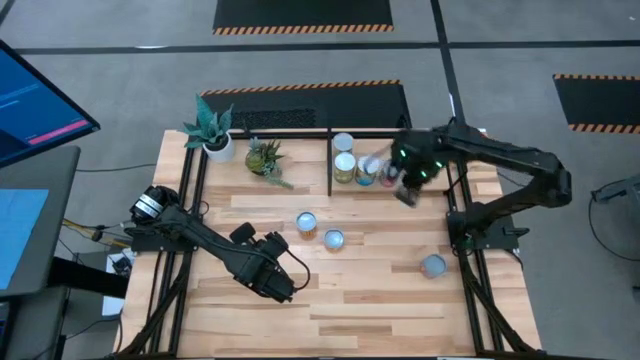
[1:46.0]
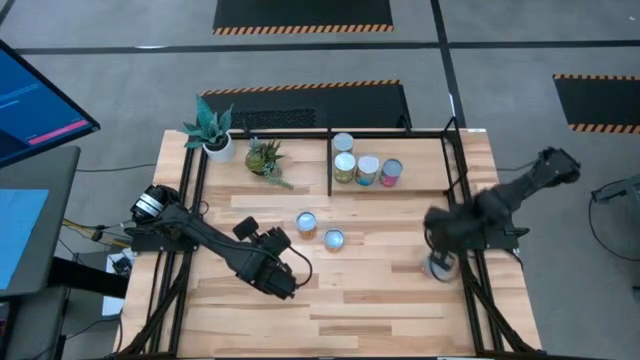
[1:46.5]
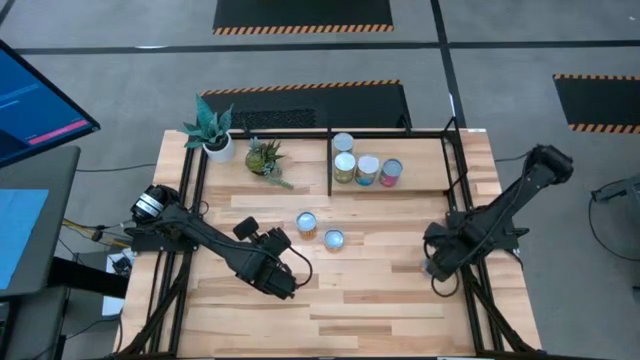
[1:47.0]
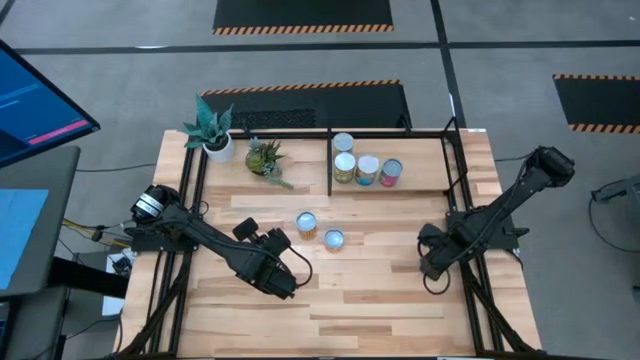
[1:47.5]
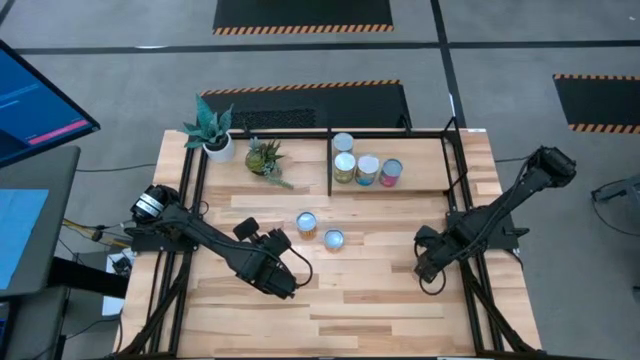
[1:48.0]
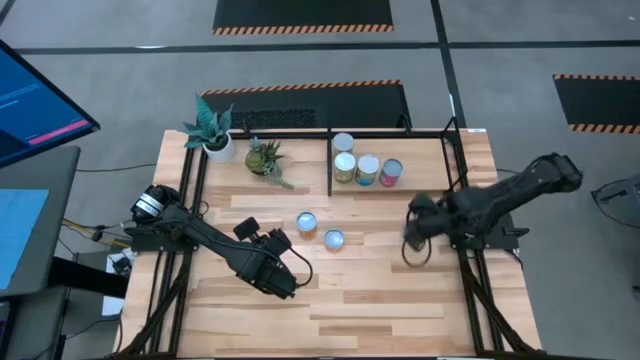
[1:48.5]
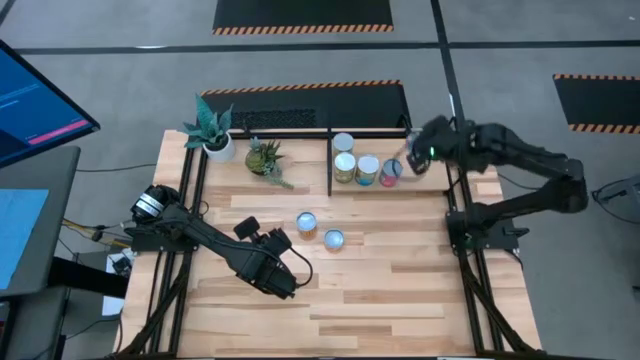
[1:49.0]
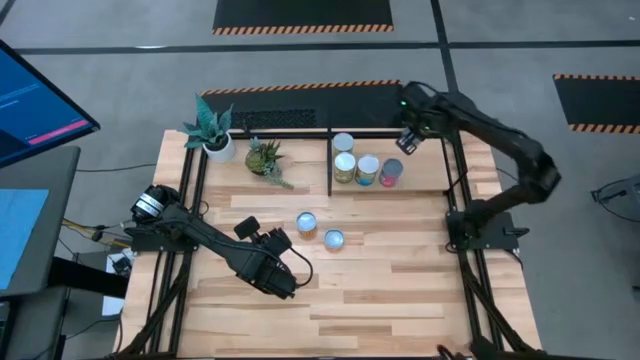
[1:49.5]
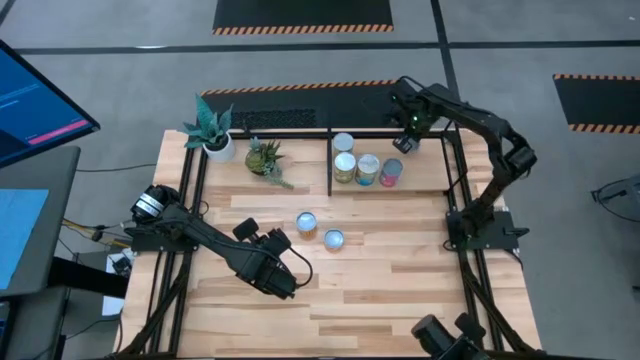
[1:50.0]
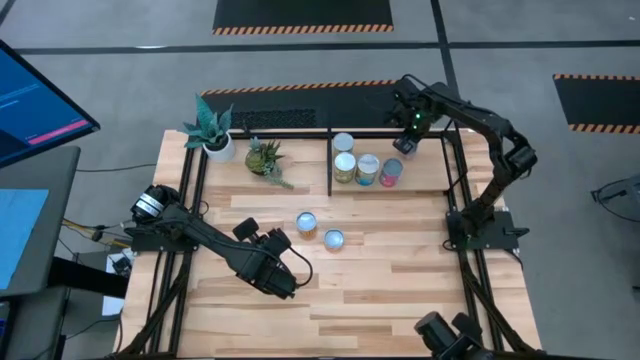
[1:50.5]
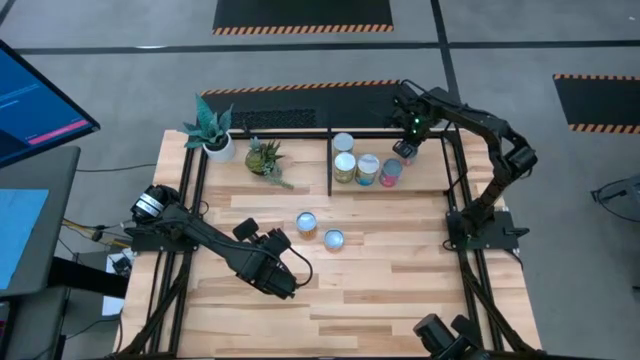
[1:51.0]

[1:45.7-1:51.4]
Task: Pick and place cans onto a shelf
Put the canned corn on the shelf

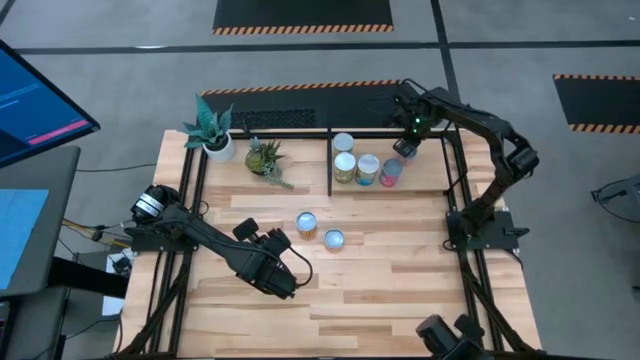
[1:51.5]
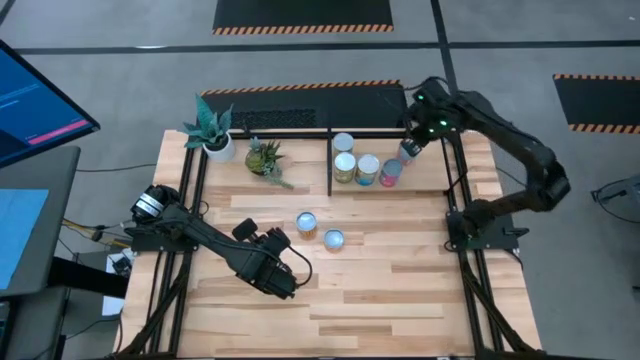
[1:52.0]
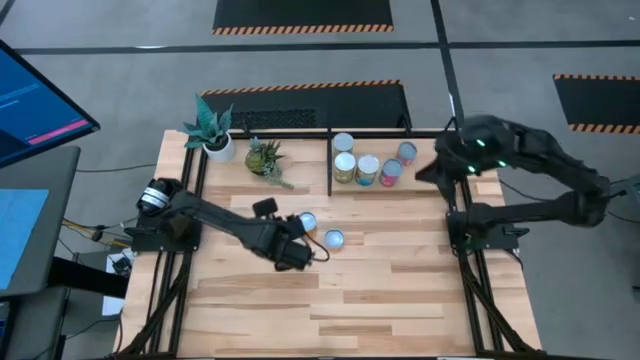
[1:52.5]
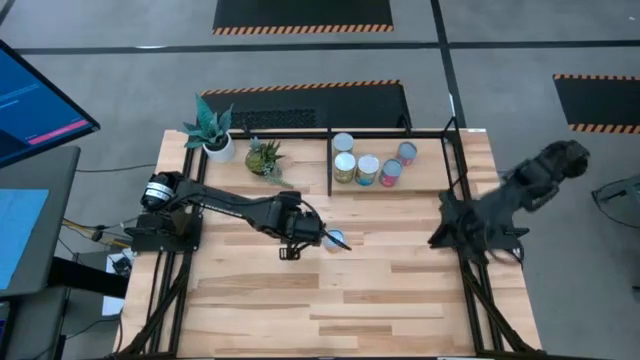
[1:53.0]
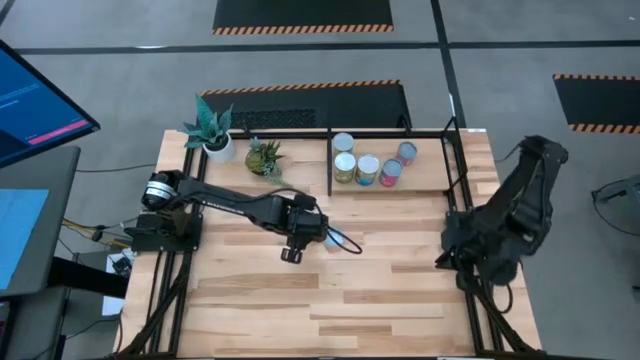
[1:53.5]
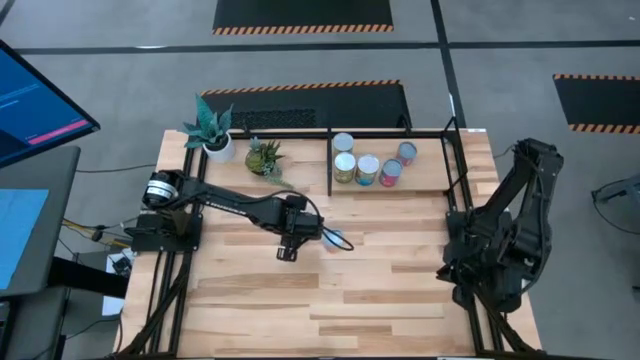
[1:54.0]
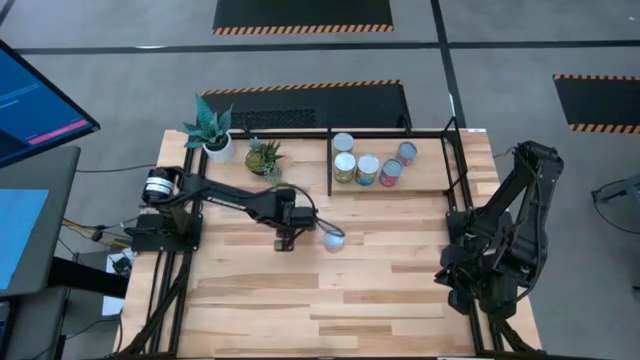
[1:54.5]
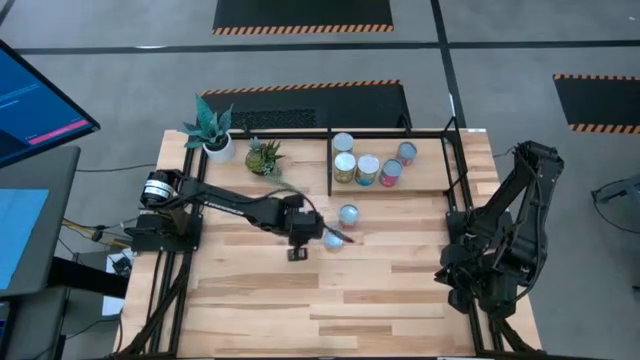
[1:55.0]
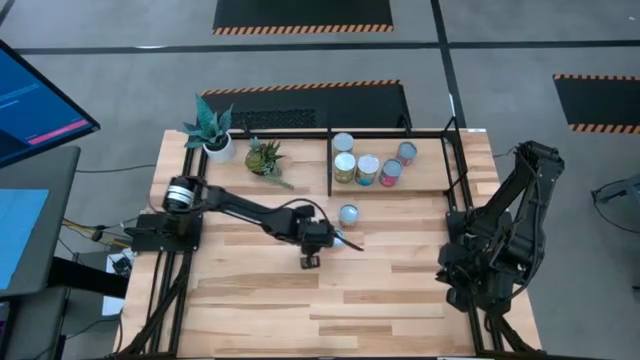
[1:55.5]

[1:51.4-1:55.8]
Prepare the canned goods to the center of the table

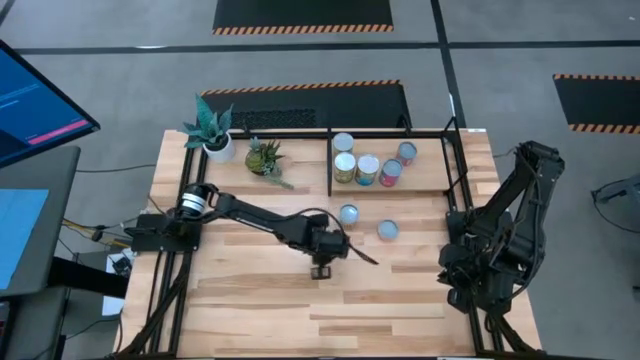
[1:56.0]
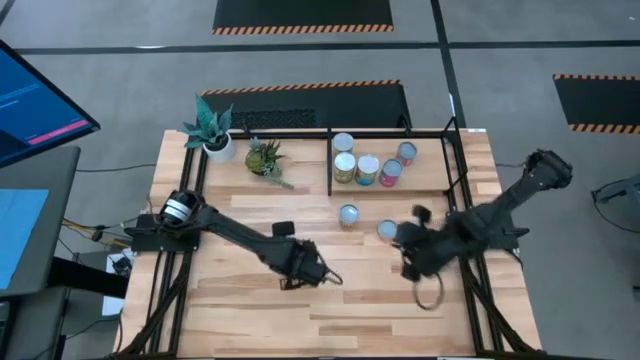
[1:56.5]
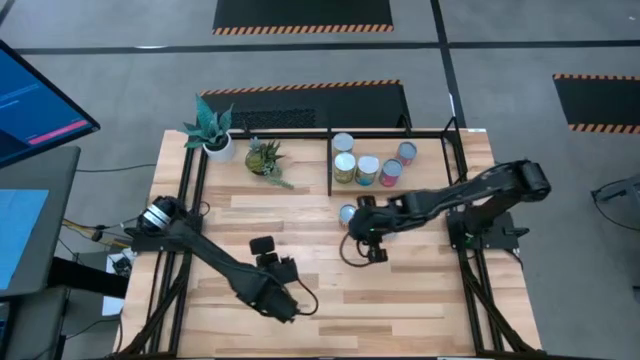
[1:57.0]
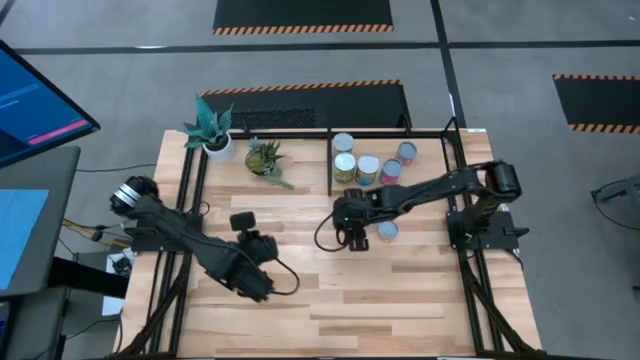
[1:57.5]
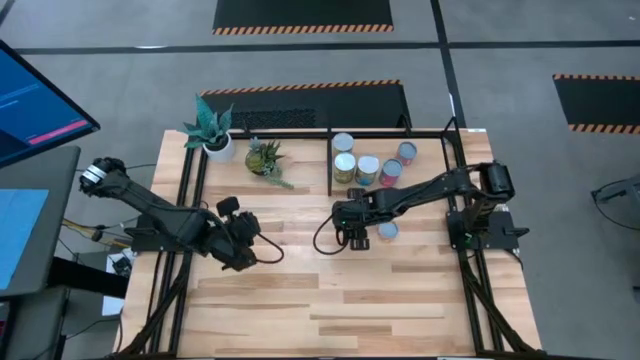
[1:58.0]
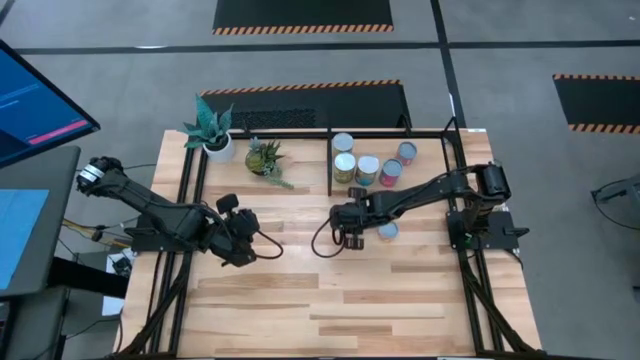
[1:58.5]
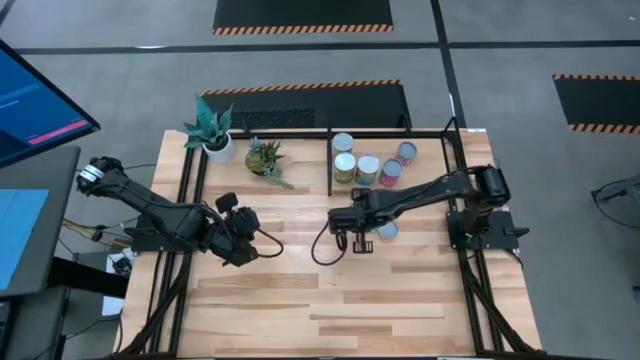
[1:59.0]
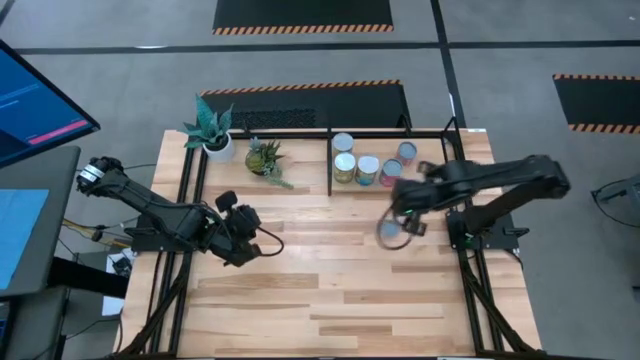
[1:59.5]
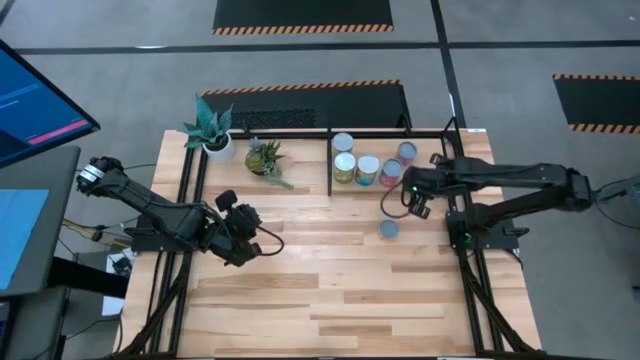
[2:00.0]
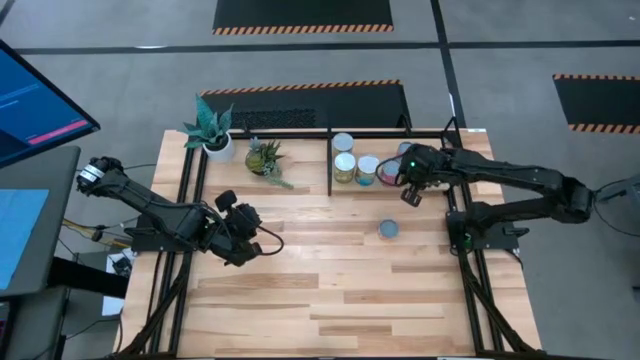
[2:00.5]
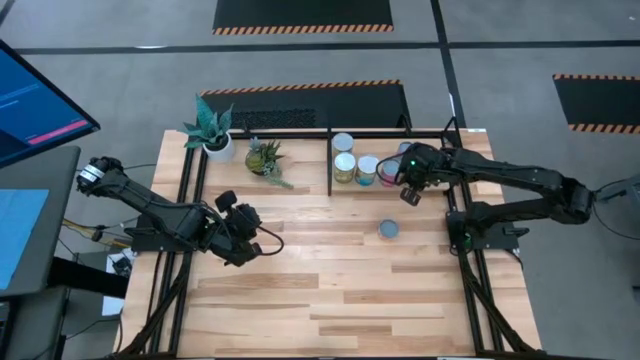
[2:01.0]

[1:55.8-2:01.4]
Put the canned black beans on the shelf

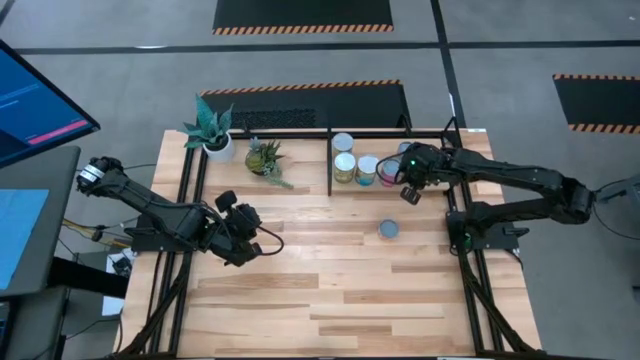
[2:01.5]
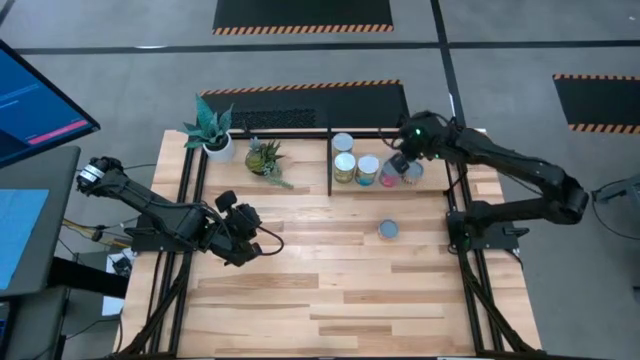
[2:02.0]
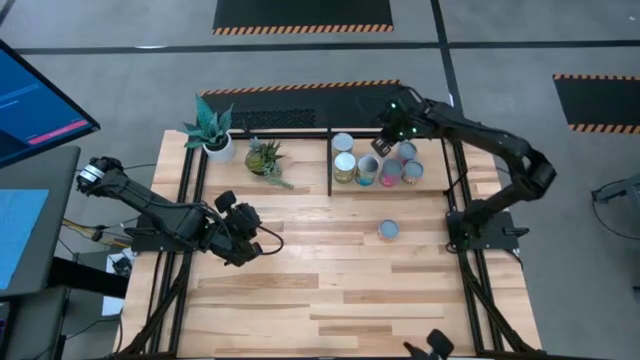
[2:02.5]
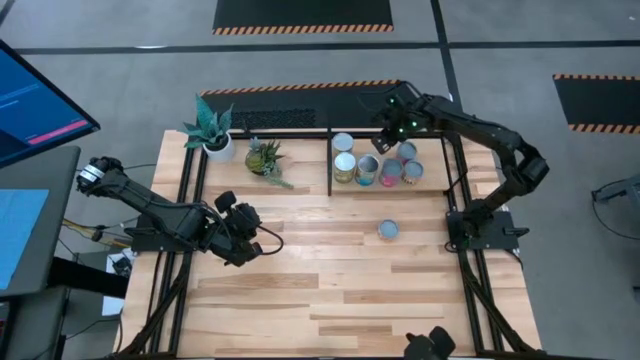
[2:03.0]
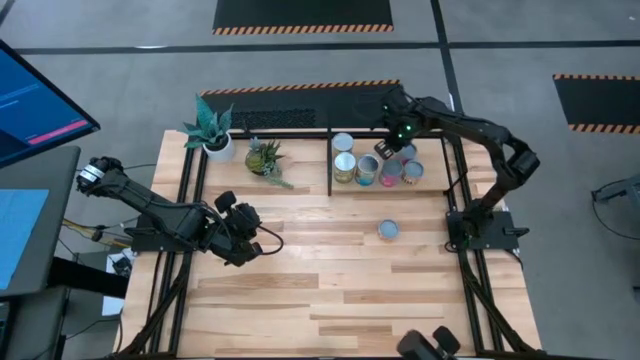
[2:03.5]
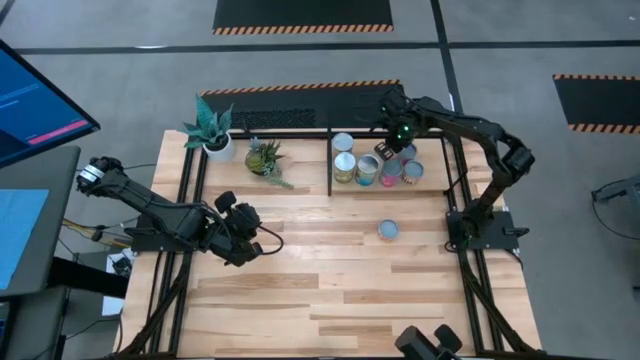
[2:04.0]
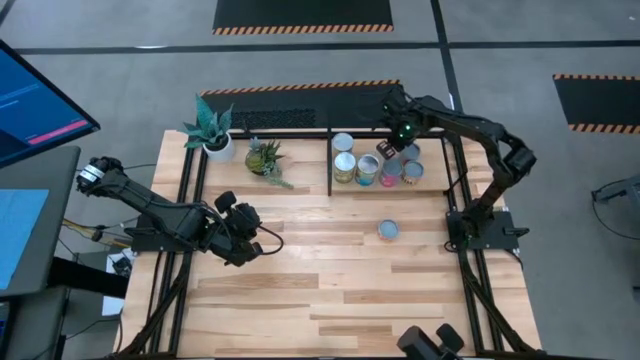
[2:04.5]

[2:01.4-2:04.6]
Adjust the canned corn on the shelf

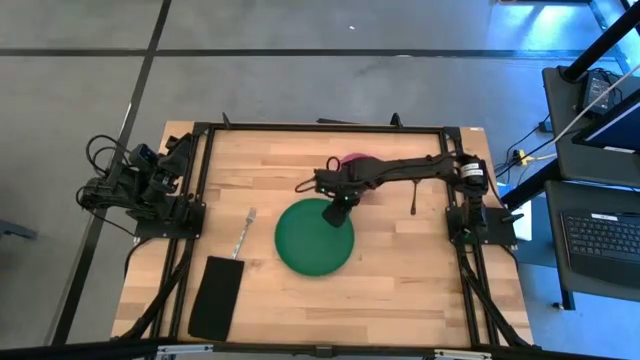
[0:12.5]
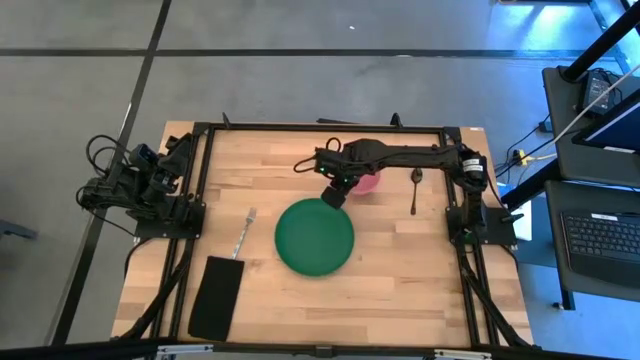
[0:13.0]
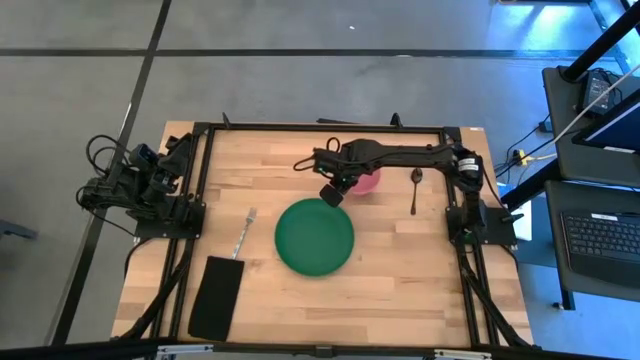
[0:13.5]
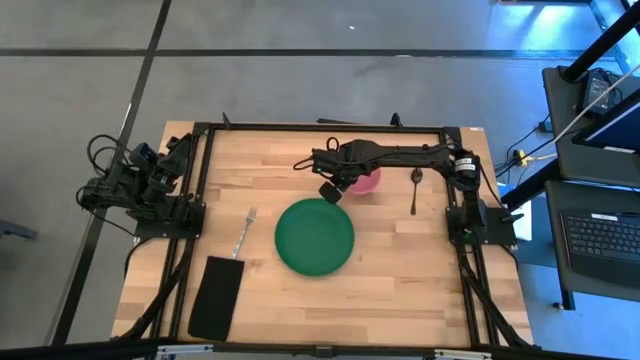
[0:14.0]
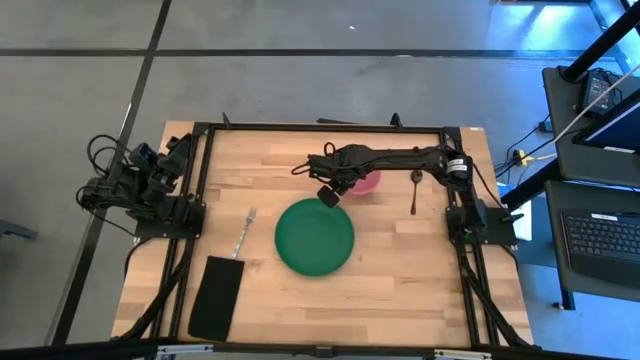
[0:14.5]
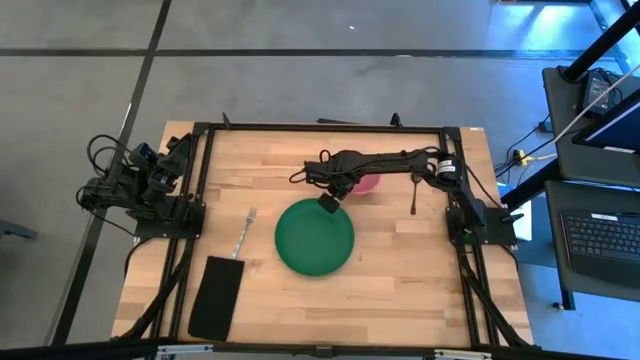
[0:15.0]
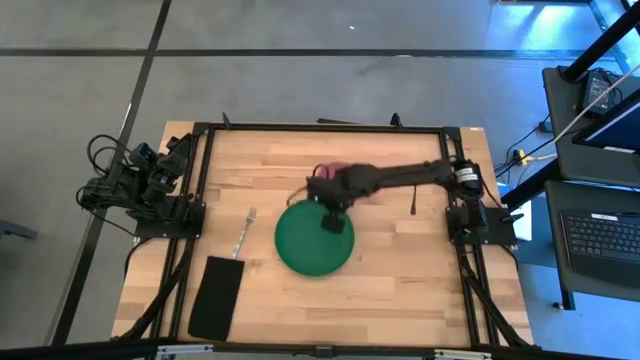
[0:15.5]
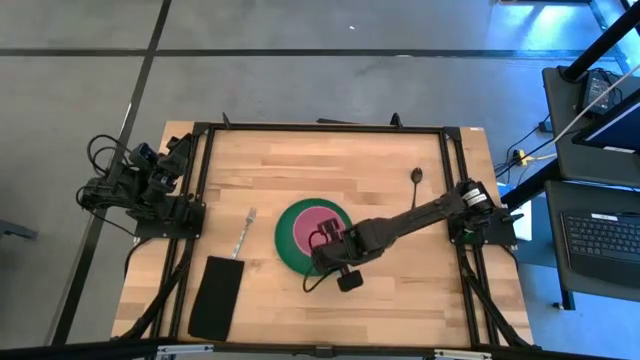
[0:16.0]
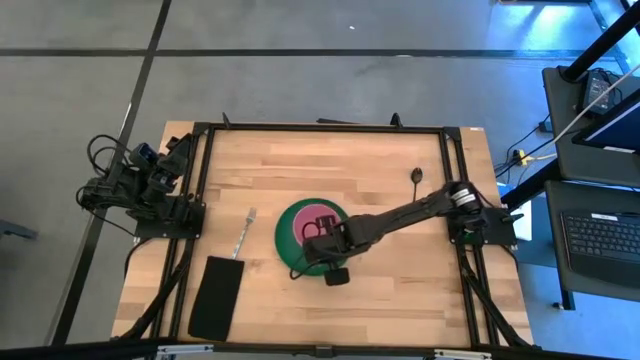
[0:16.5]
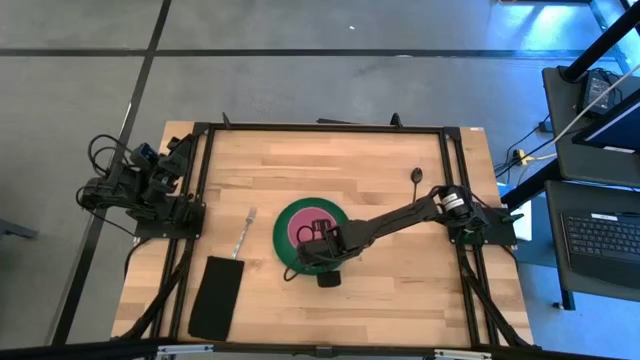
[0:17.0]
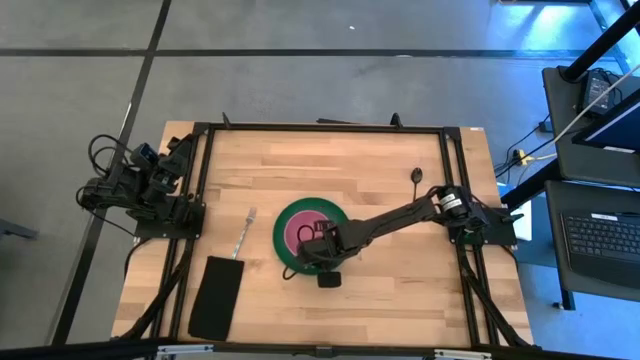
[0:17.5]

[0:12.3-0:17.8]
Task: Set table place
Put the light pink bowl on the green plate
